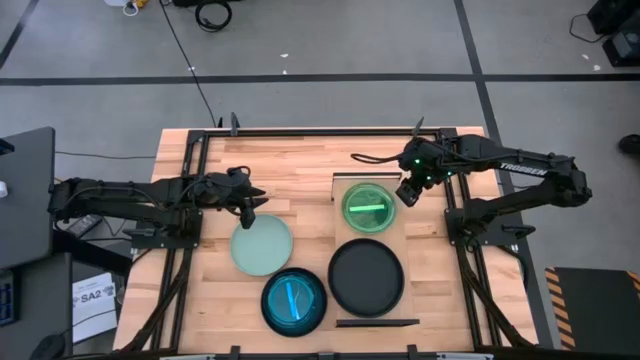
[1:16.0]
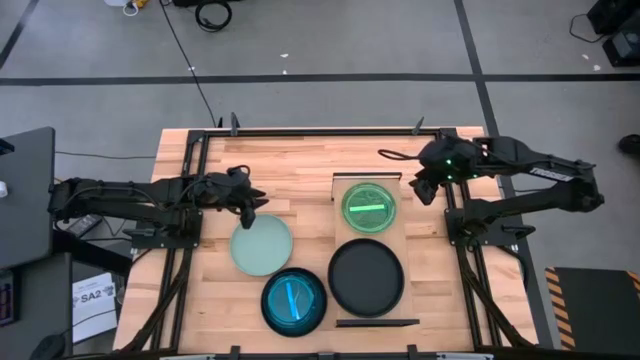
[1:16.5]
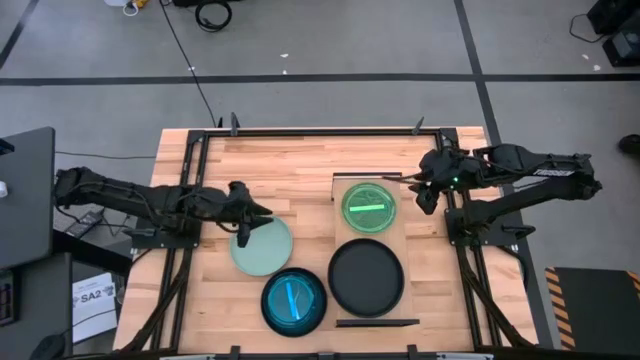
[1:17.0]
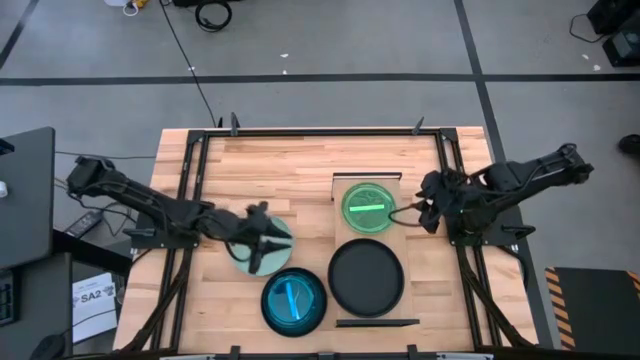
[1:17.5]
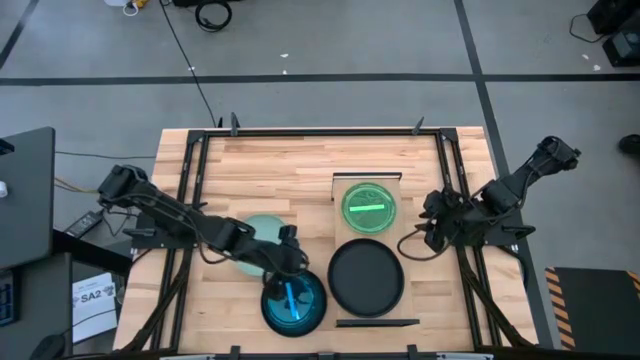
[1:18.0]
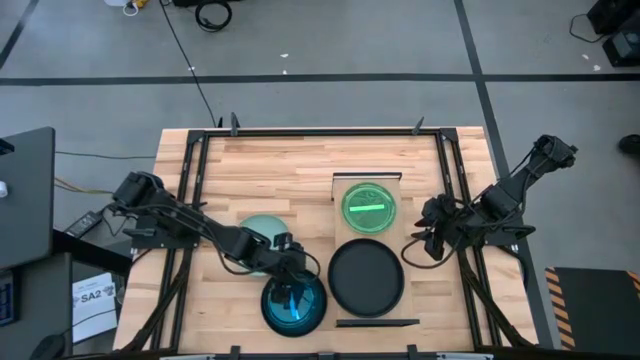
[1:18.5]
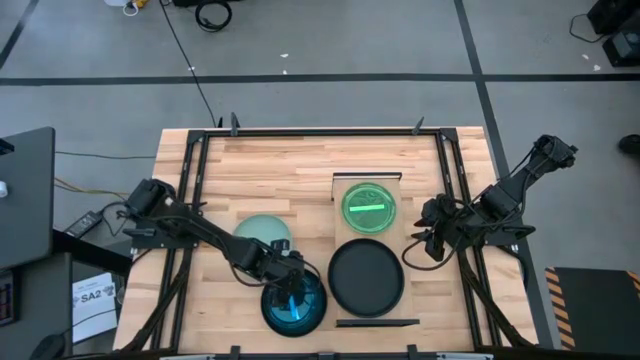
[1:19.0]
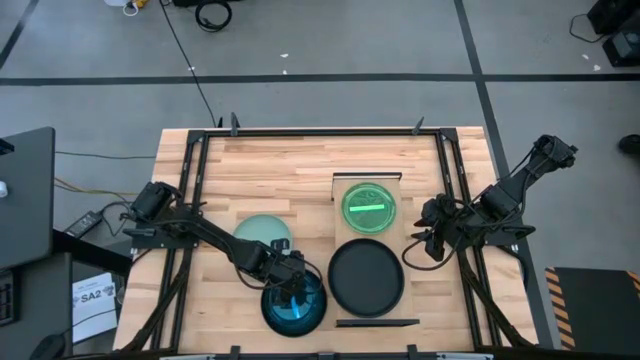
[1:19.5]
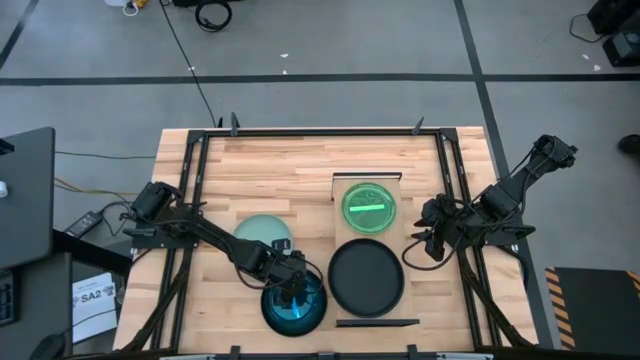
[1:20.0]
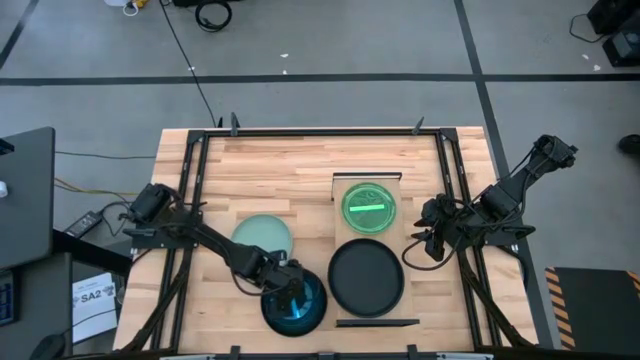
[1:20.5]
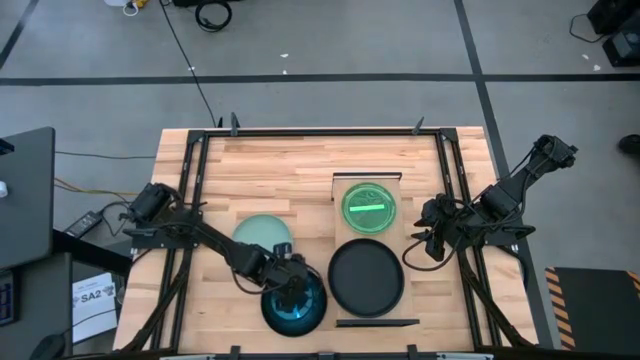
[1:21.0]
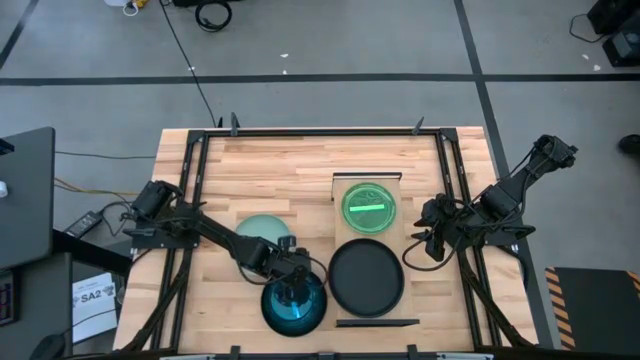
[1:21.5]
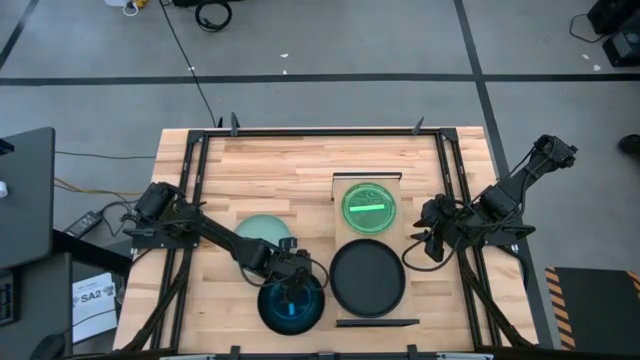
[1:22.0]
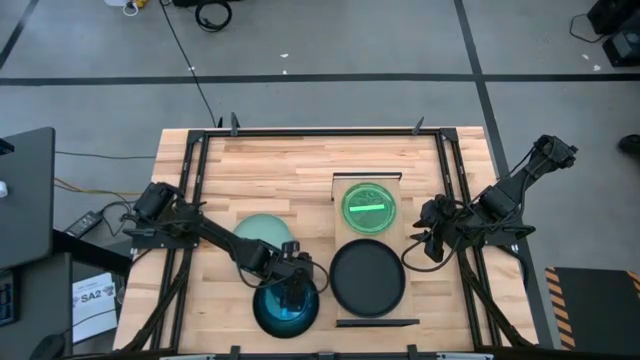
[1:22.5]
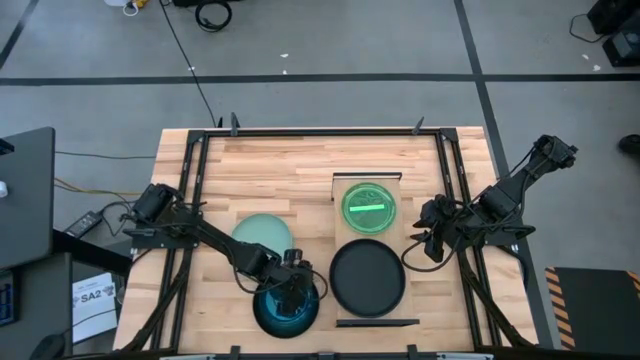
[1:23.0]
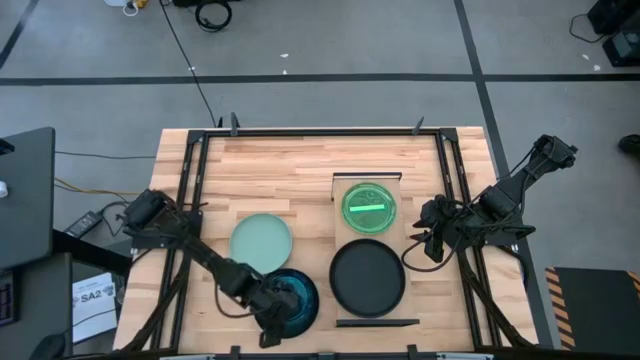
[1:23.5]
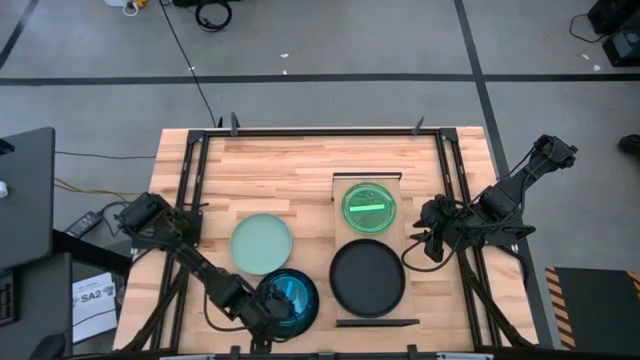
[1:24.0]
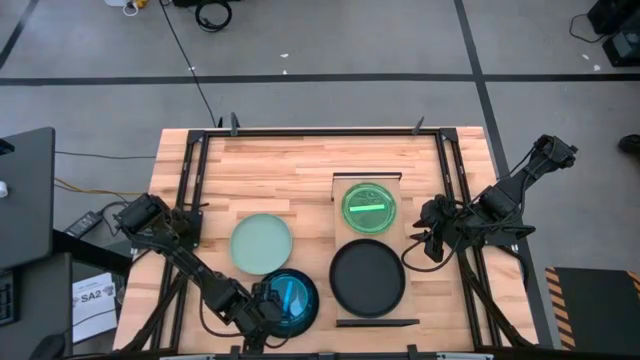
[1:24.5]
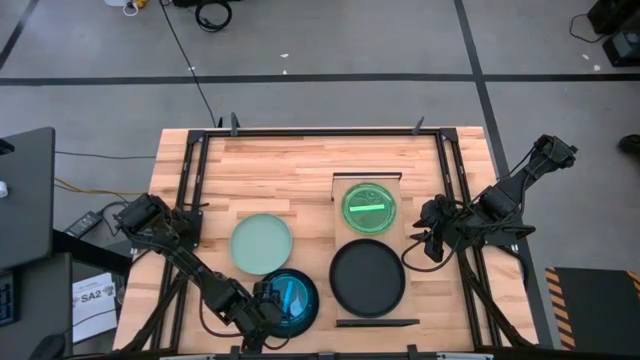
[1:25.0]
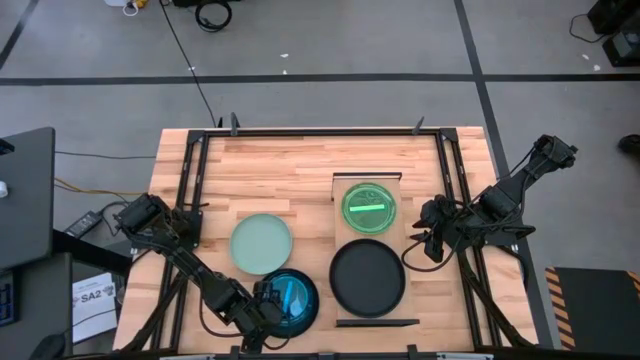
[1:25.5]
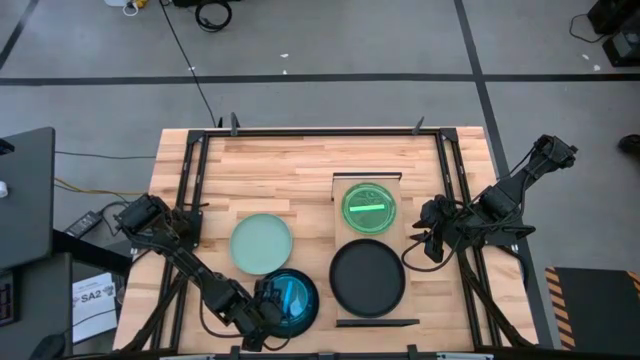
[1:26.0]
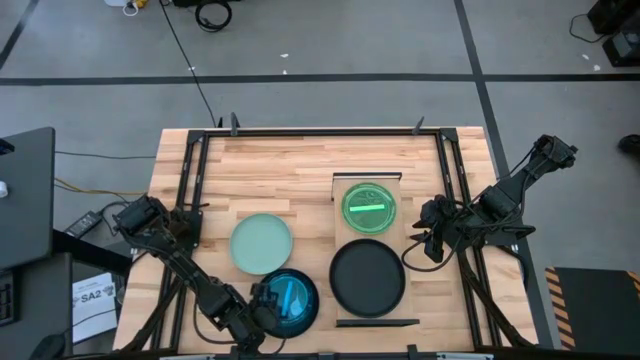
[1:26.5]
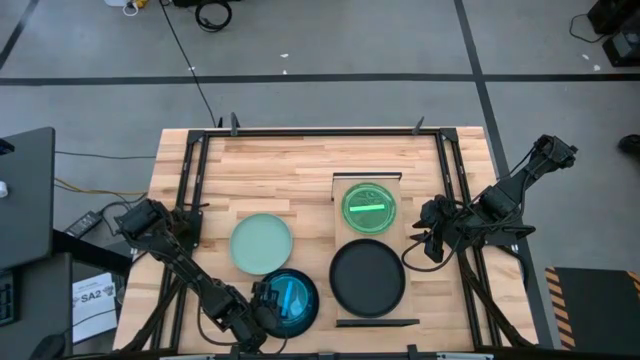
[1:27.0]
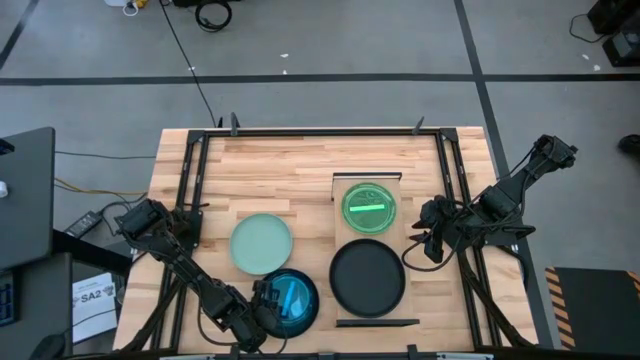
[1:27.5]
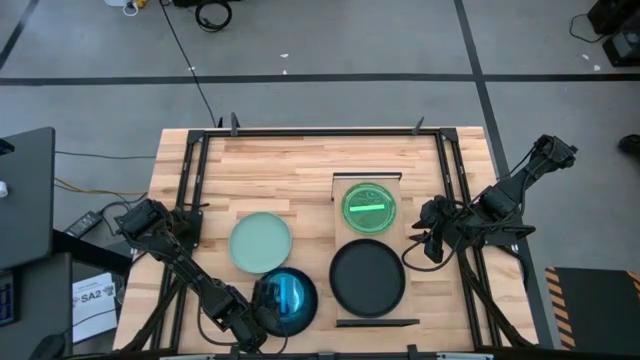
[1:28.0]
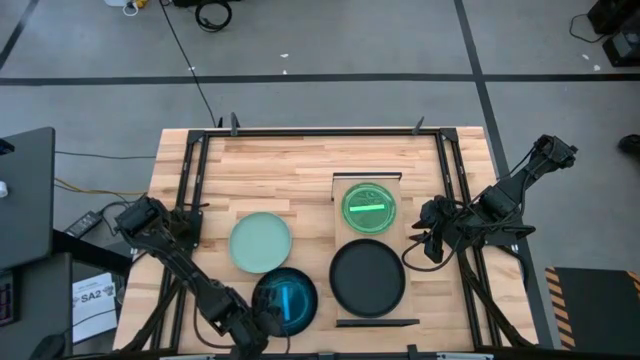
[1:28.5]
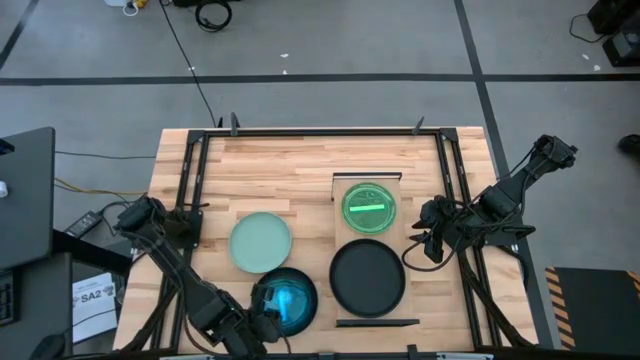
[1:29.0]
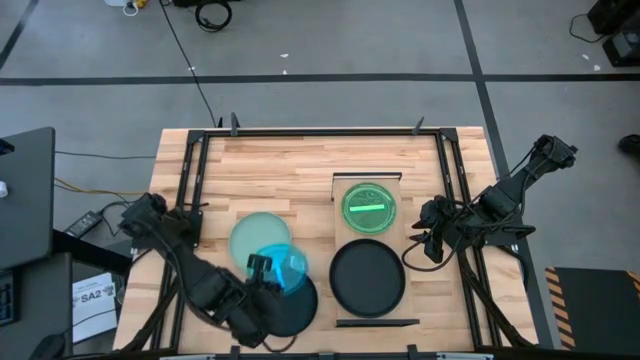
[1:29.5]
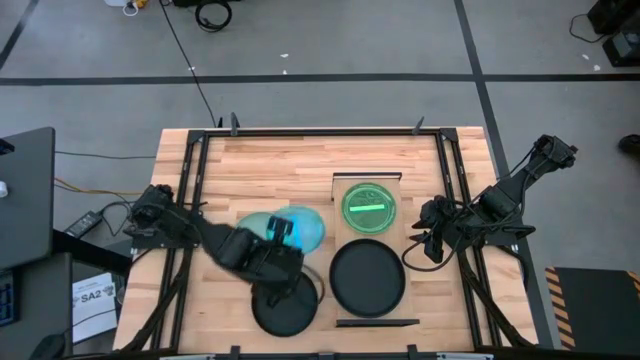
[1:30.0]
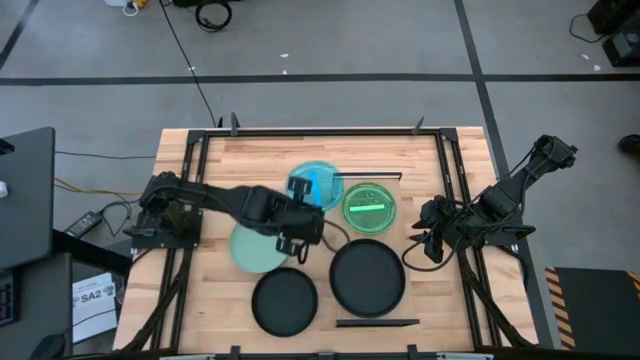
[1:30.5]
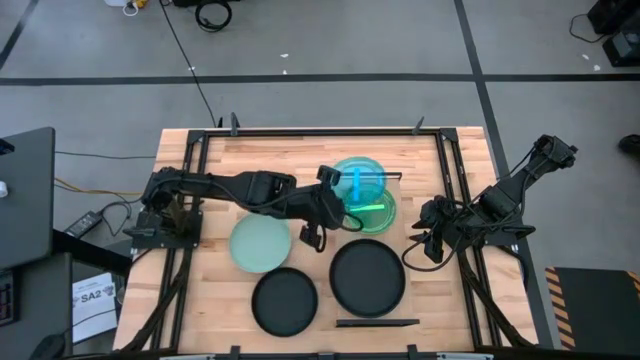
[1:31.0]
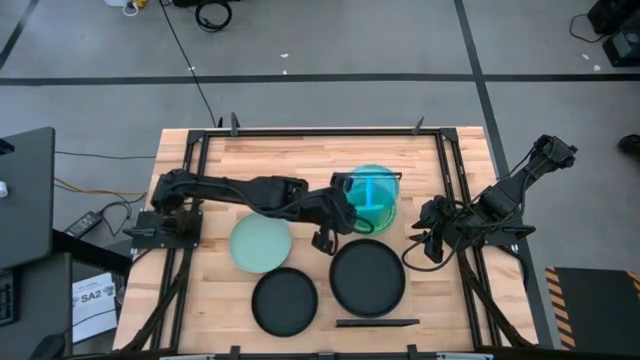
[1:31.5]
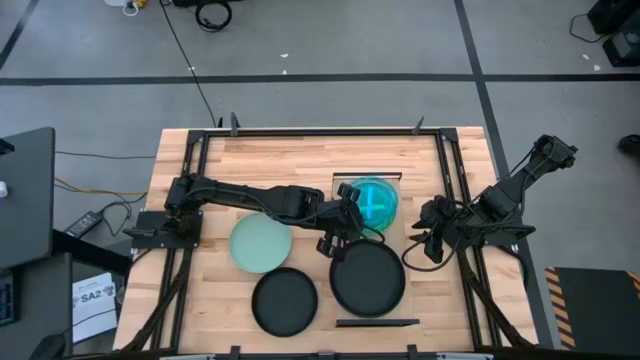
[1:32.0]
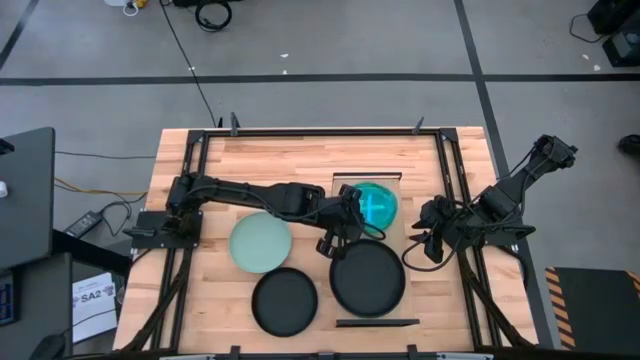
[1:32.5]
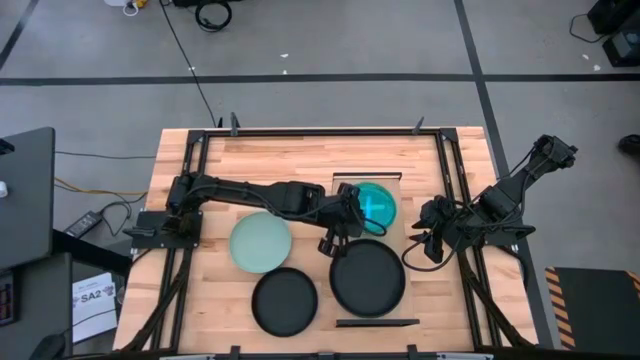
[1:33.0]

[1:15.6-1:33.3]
Task: Place and stack plates onto a shelf
Put the blue plate on the top of the green plate on the shelf
